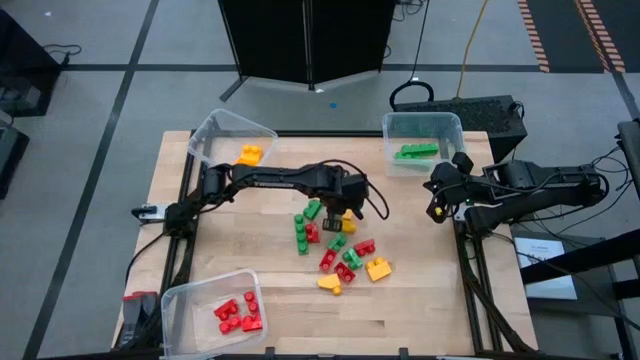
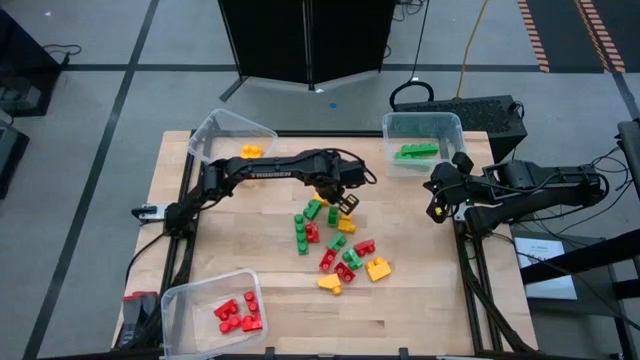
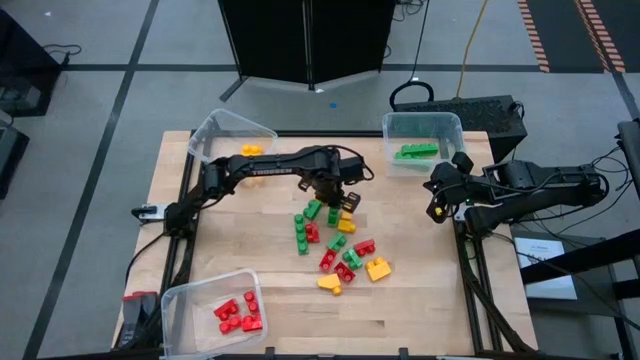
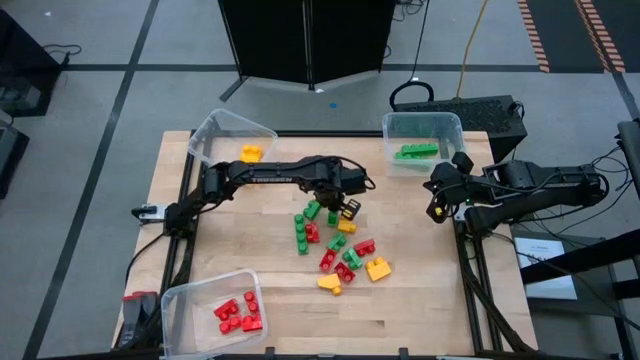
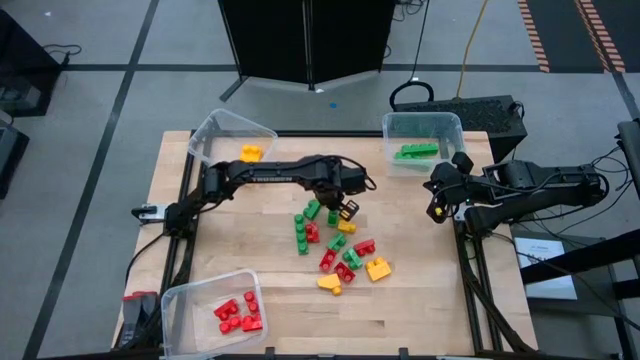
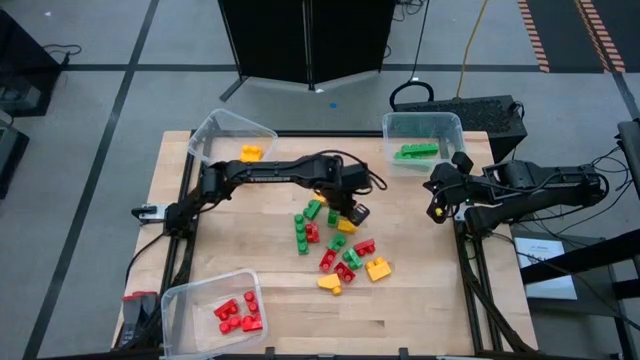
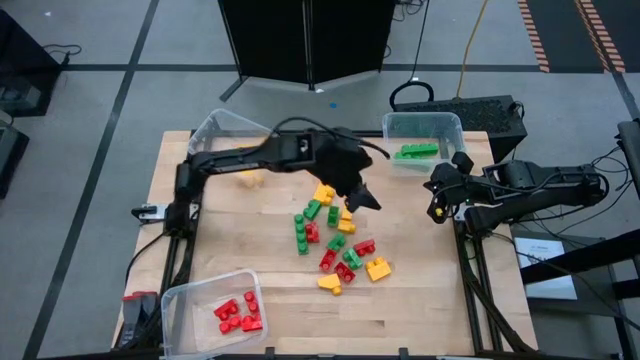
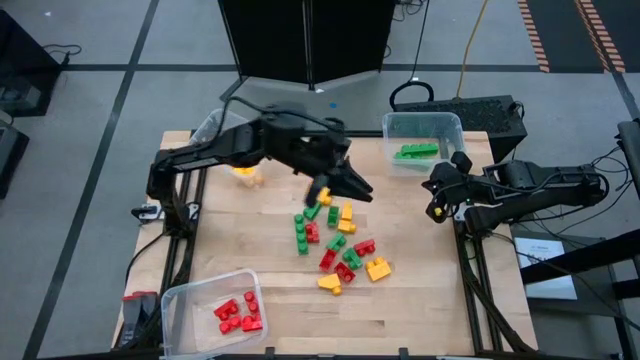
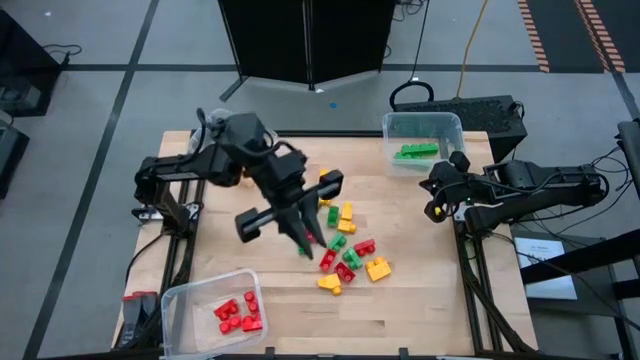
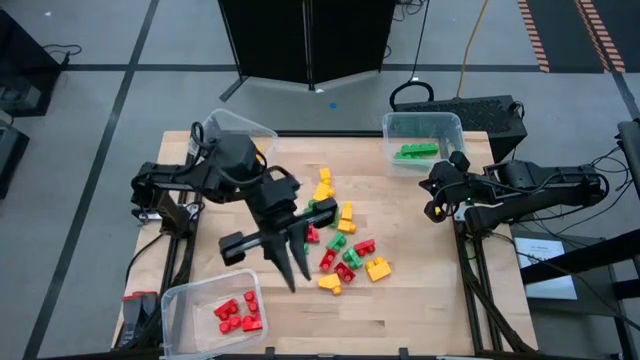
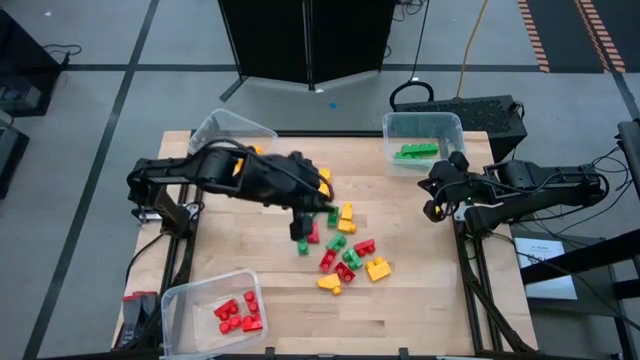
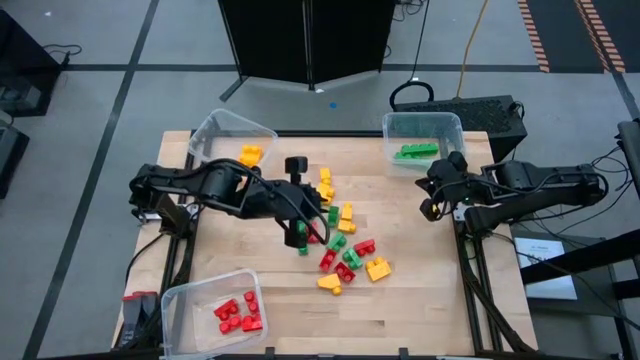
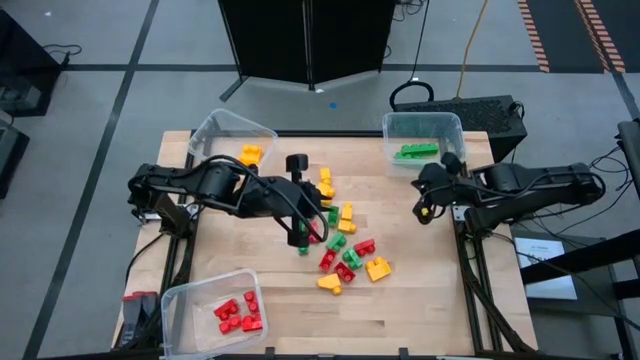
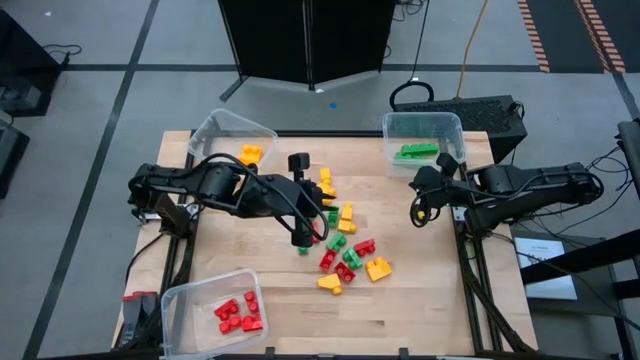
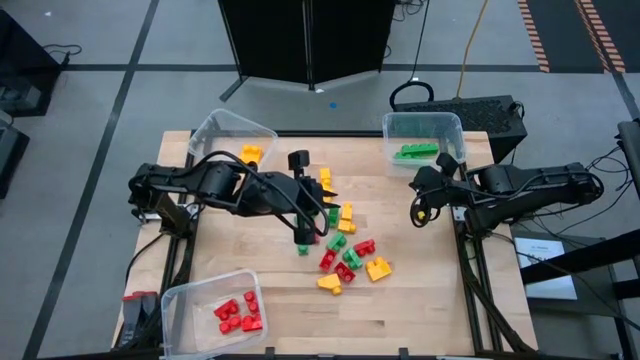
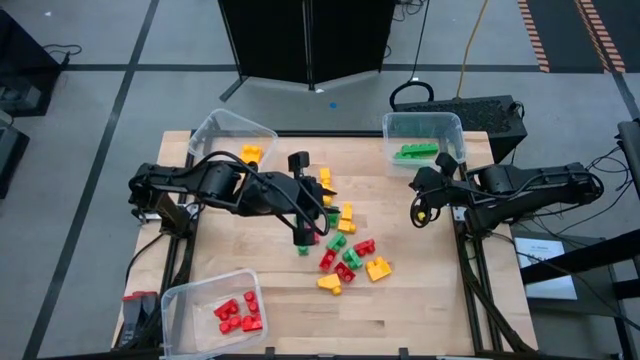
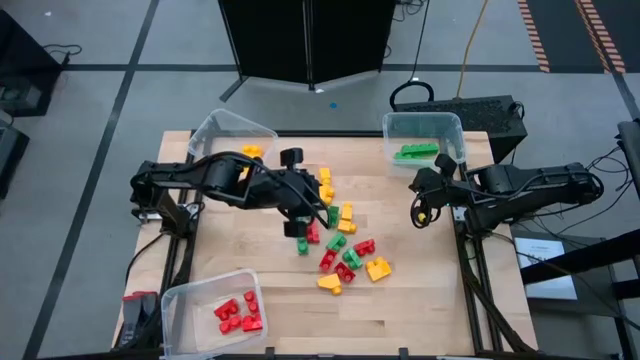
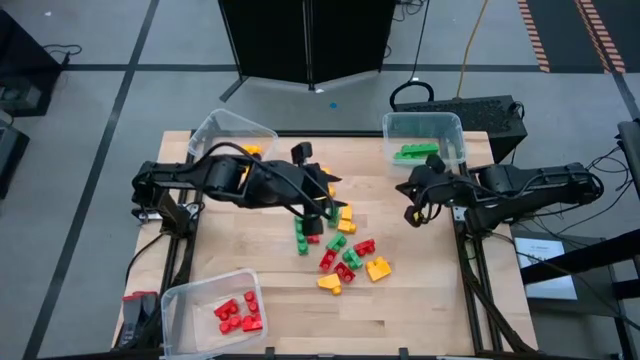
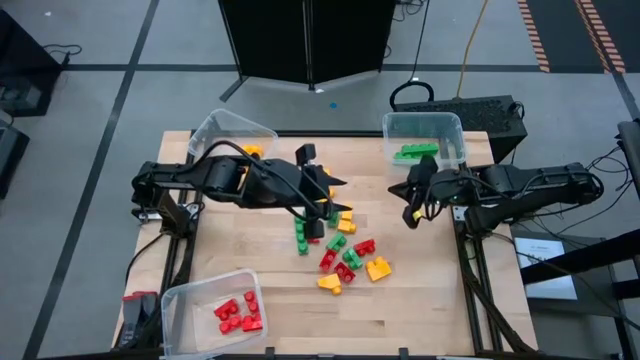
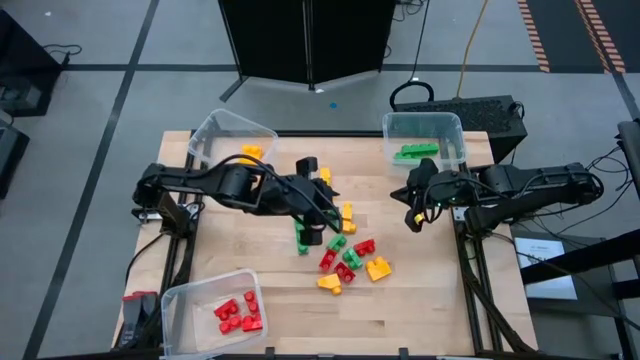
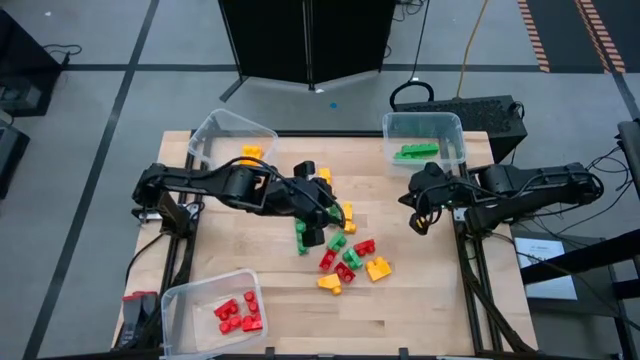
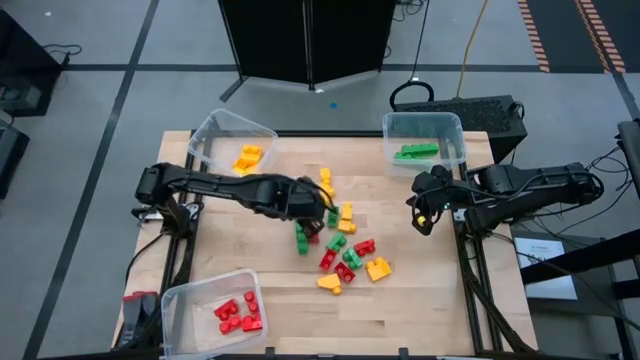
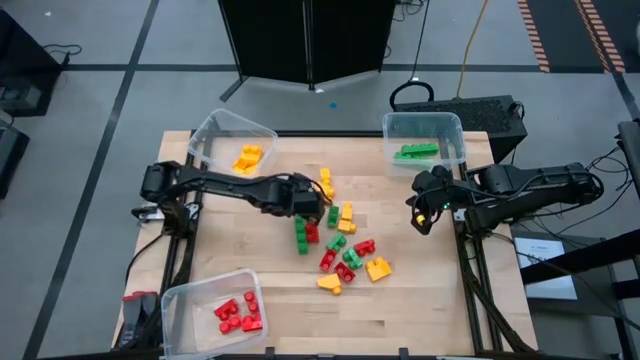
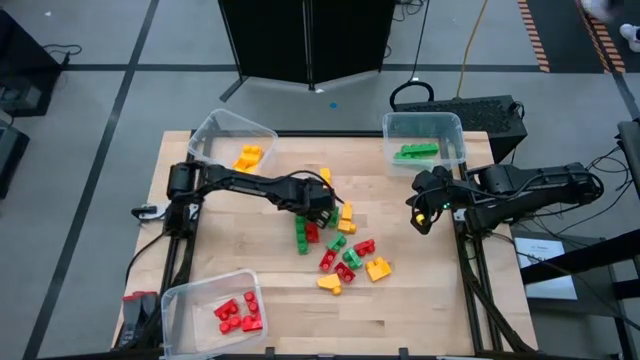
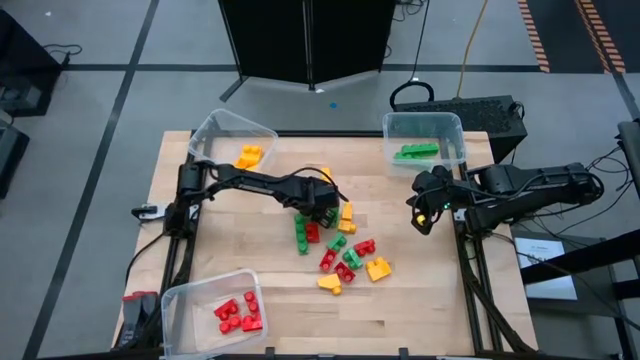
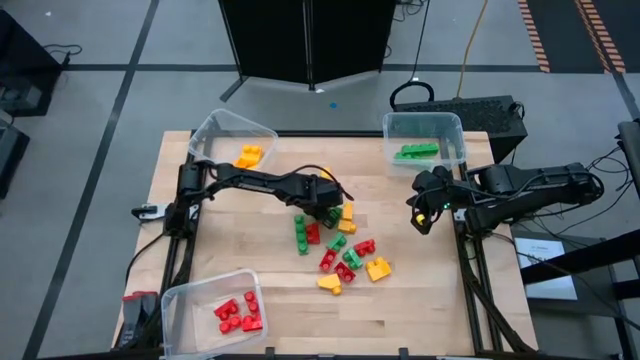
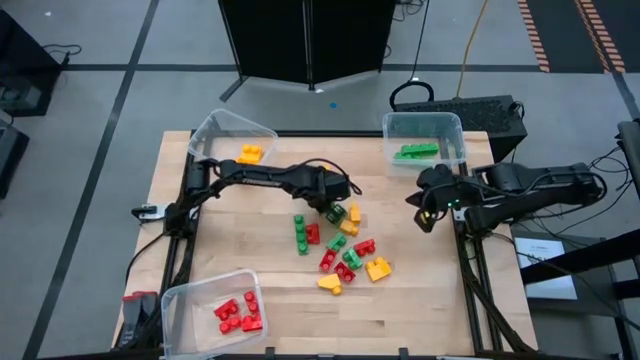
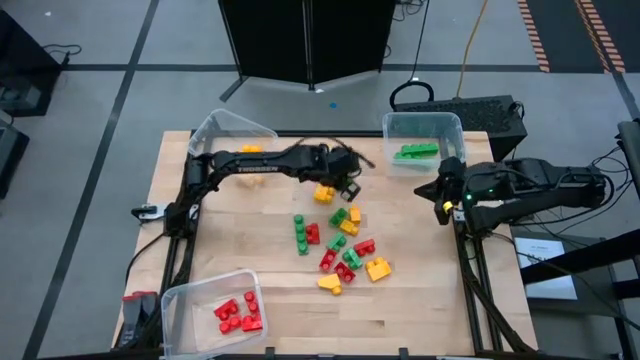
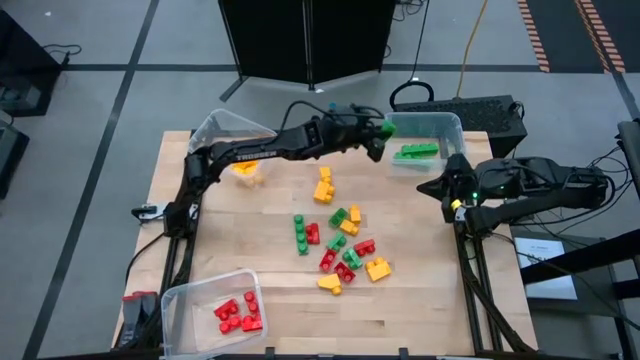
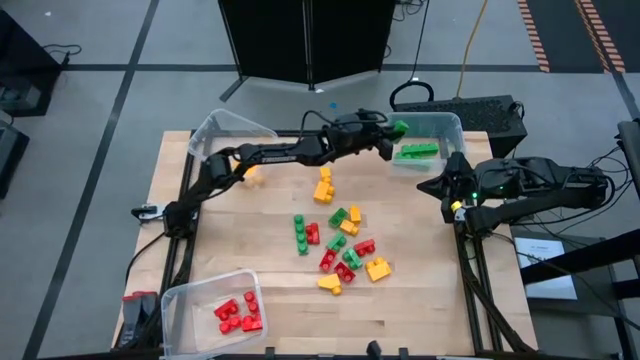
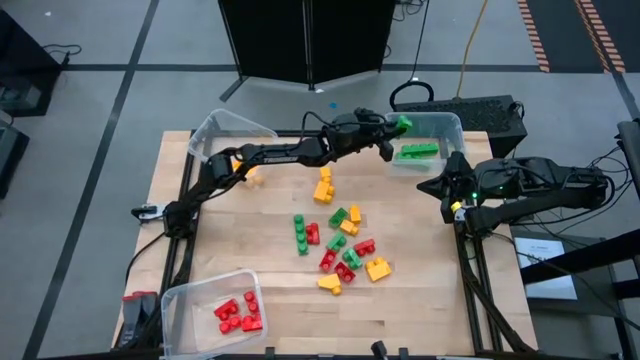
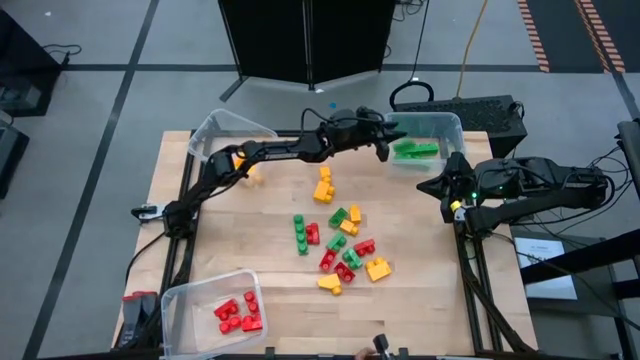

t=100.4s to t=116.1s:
Task: Sort blocks
Put the green game piece into the top right transparent bin

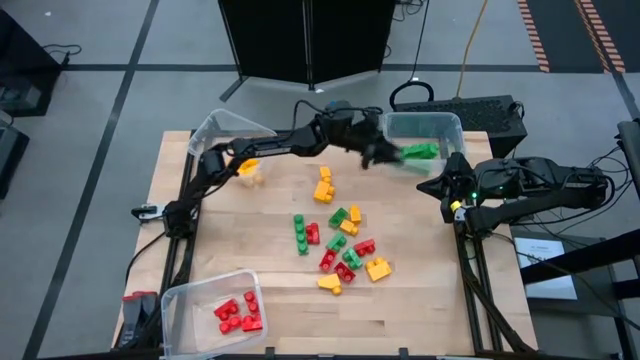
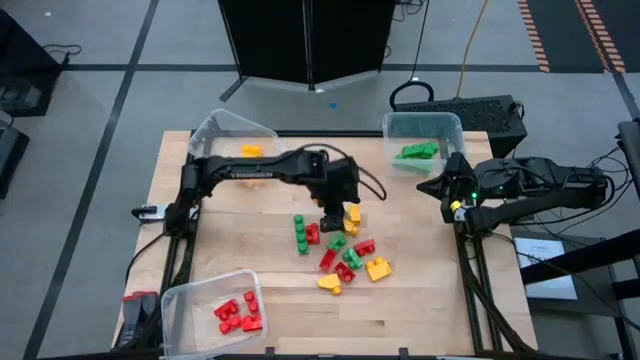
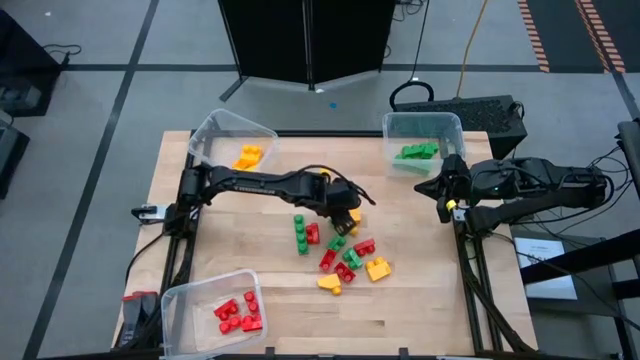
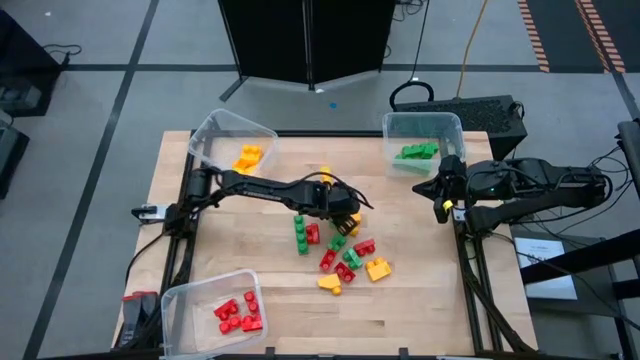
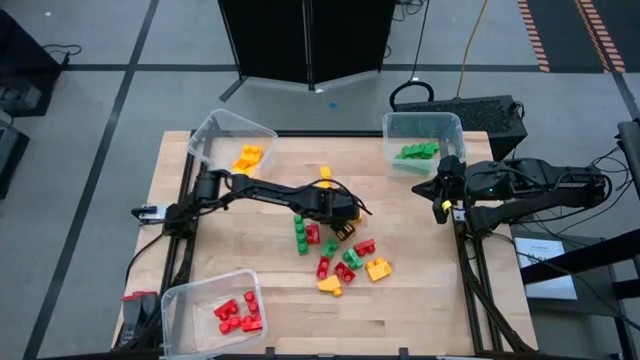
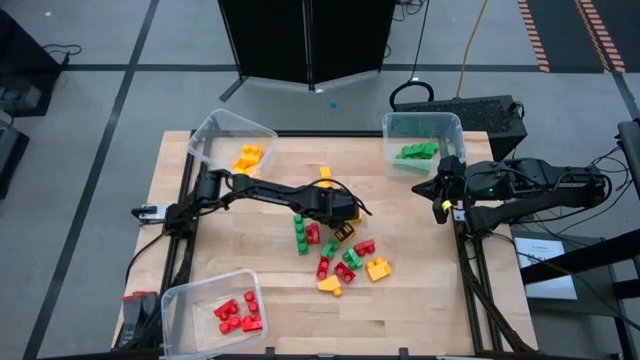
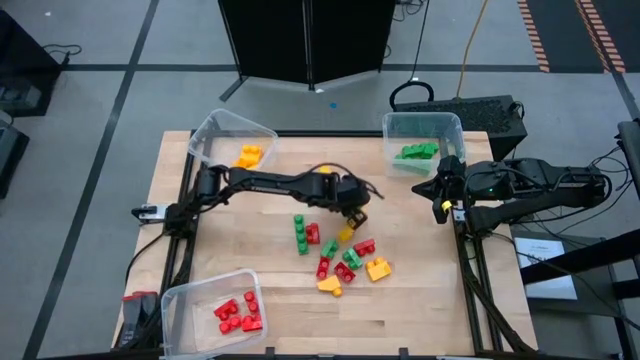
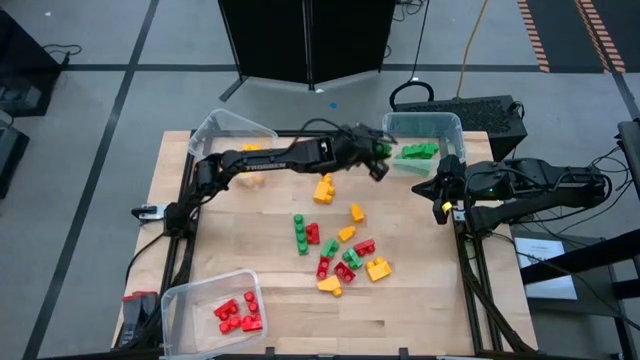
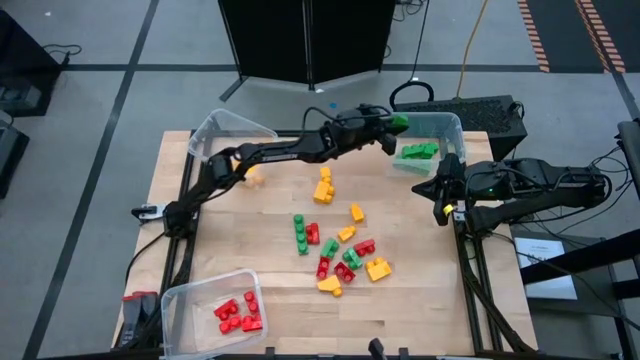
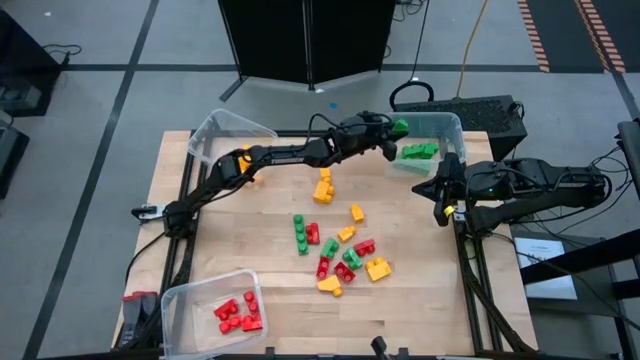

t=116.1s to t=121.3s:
Put the green game piece into the top right transparent bin
